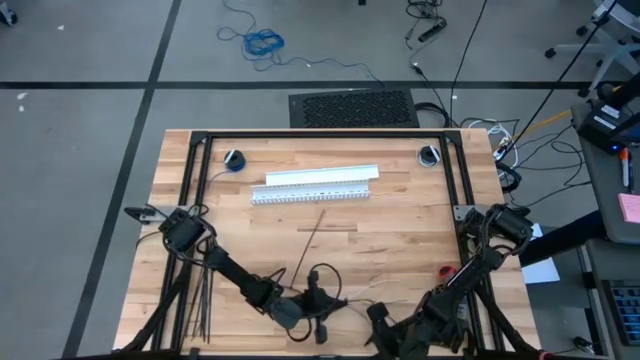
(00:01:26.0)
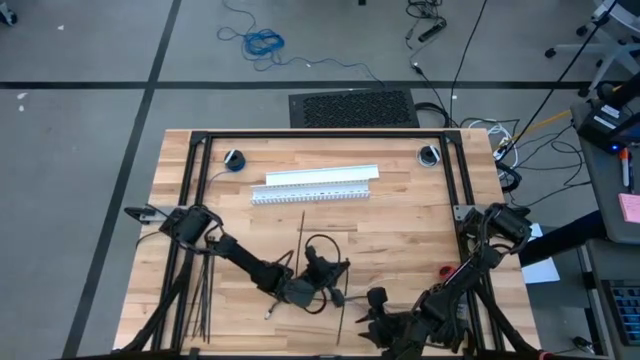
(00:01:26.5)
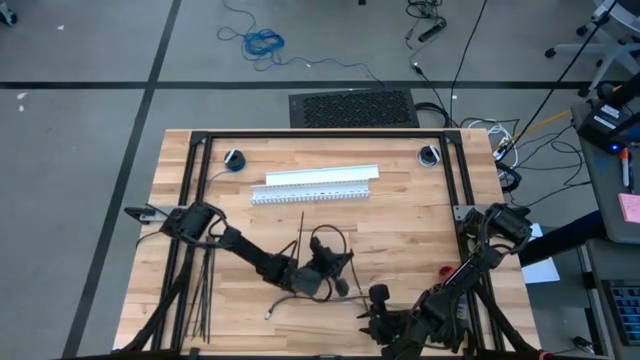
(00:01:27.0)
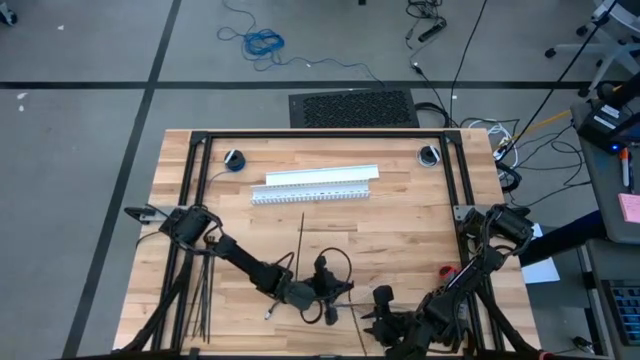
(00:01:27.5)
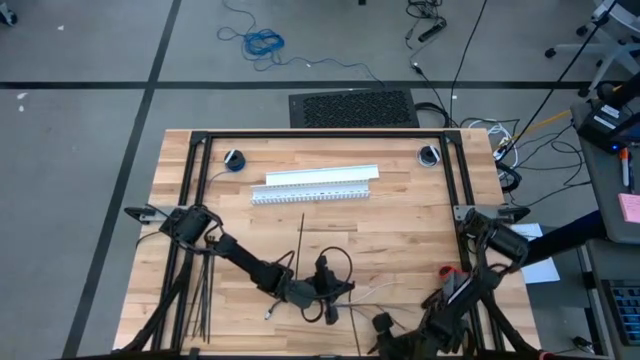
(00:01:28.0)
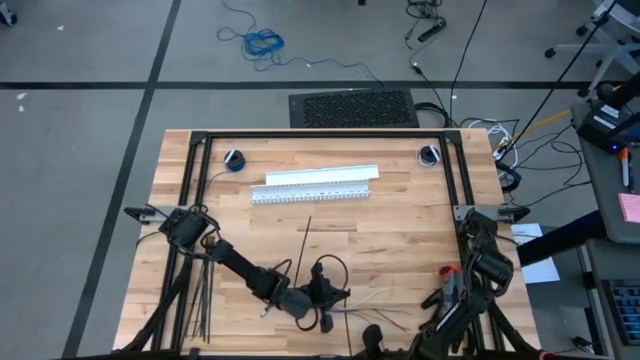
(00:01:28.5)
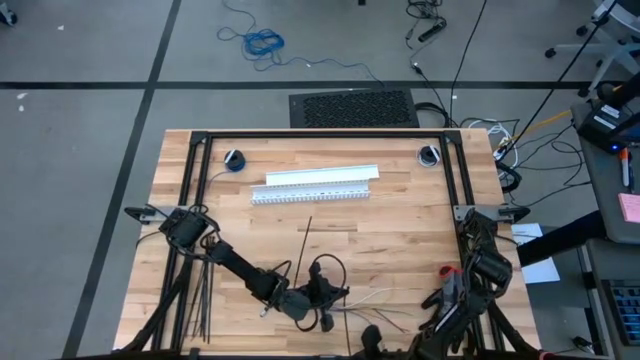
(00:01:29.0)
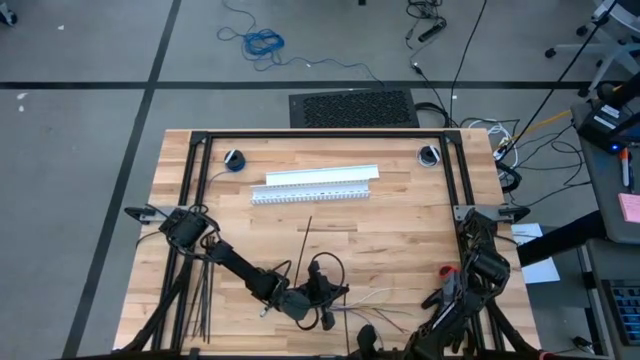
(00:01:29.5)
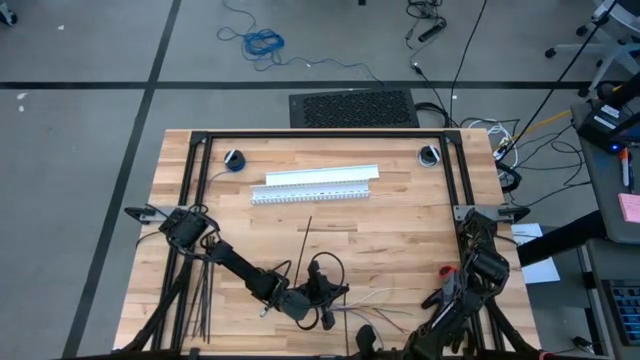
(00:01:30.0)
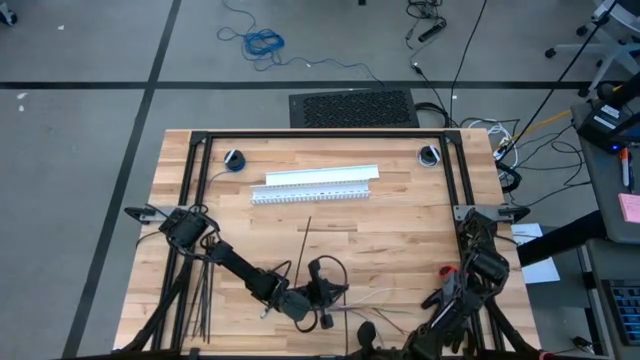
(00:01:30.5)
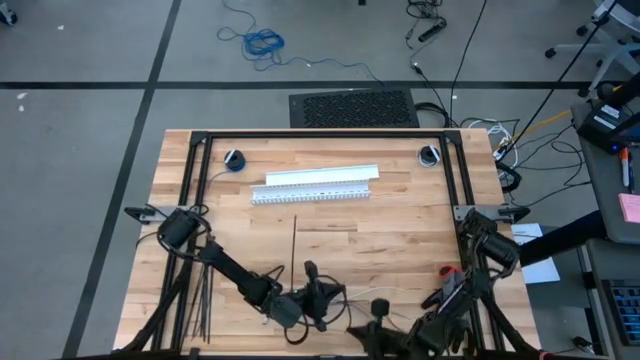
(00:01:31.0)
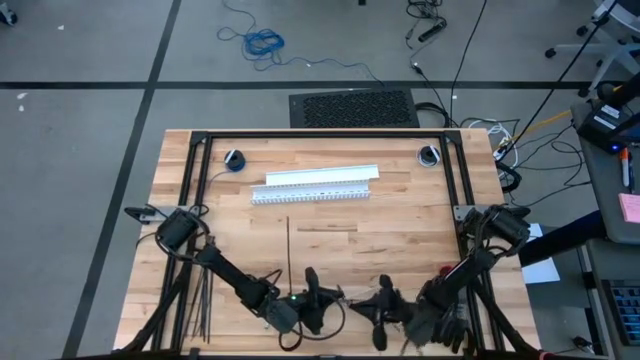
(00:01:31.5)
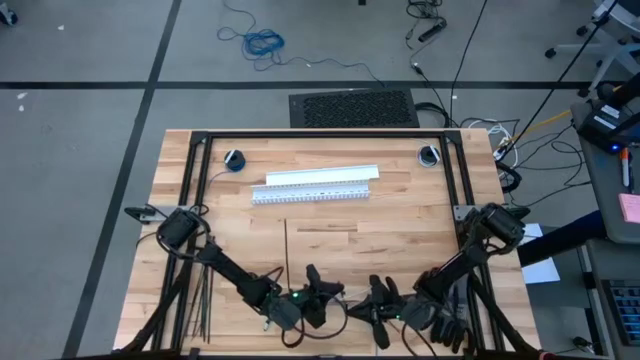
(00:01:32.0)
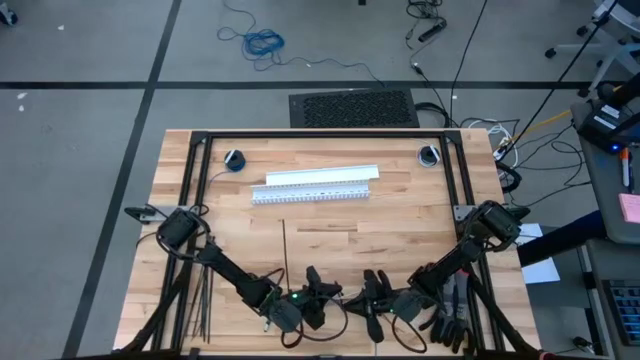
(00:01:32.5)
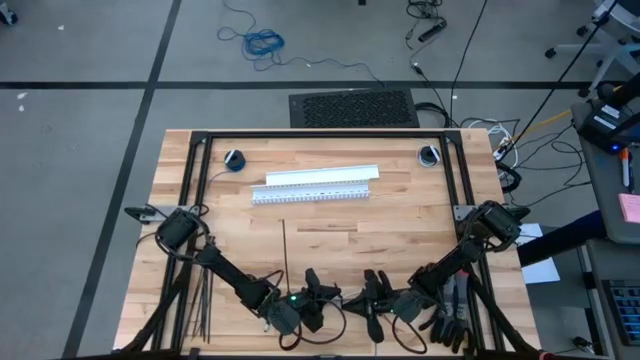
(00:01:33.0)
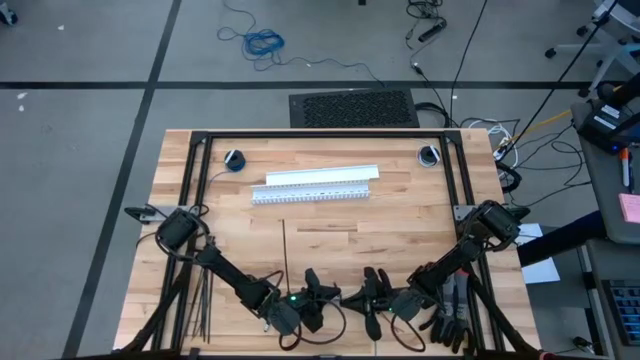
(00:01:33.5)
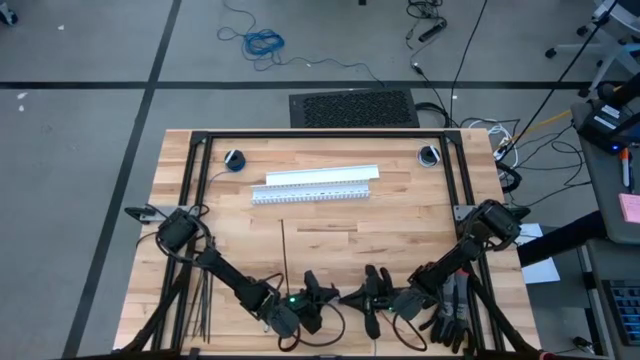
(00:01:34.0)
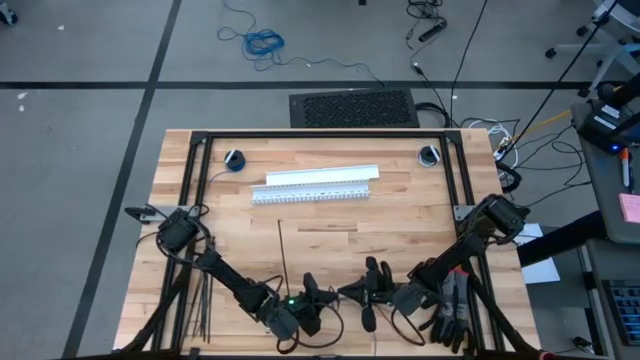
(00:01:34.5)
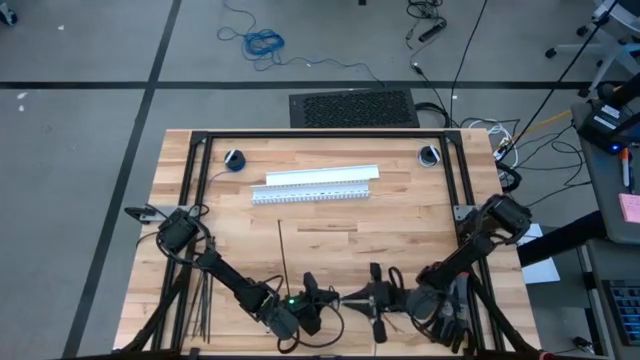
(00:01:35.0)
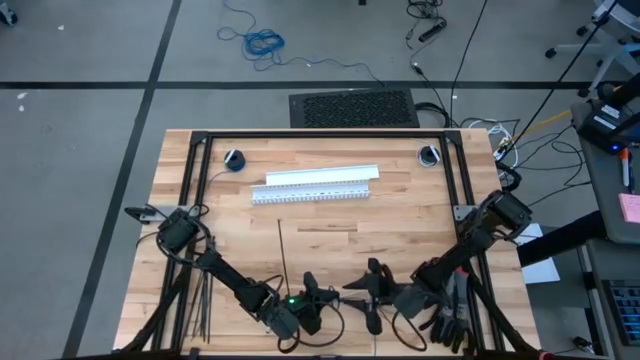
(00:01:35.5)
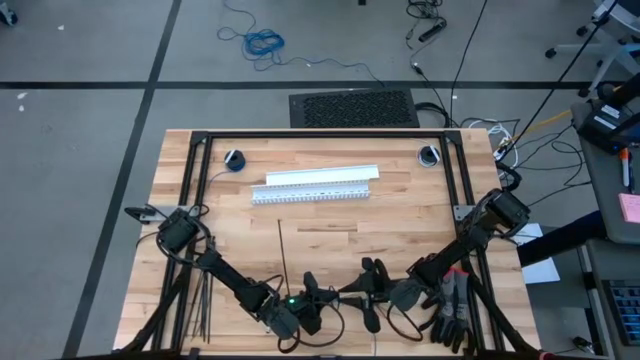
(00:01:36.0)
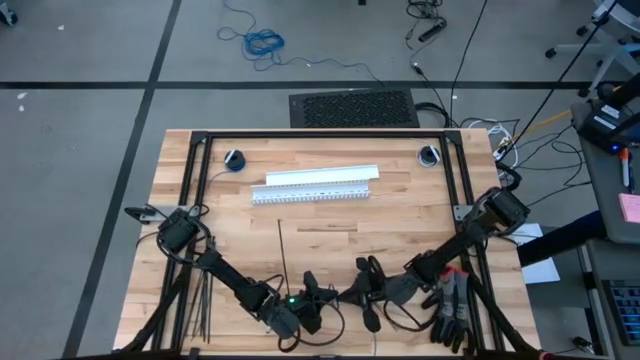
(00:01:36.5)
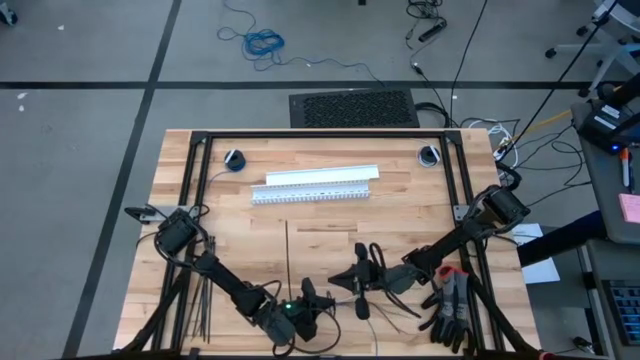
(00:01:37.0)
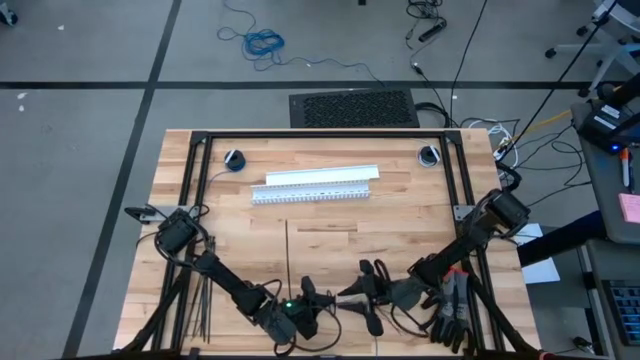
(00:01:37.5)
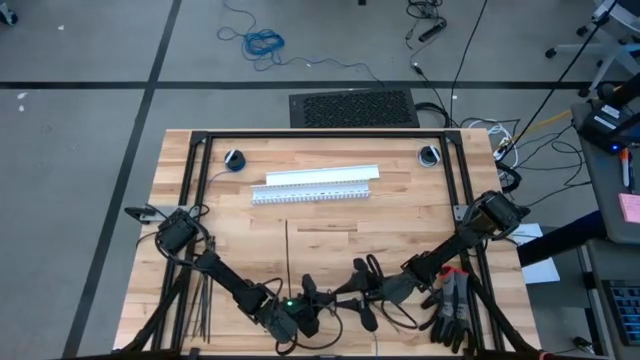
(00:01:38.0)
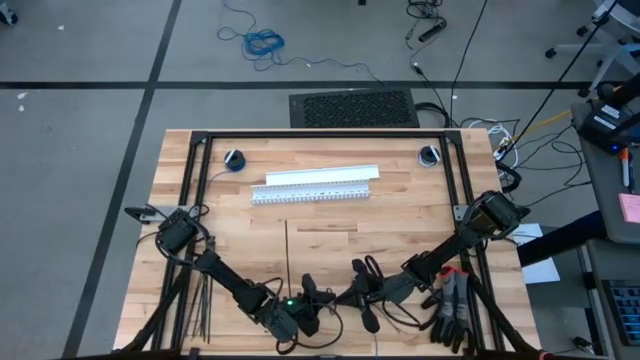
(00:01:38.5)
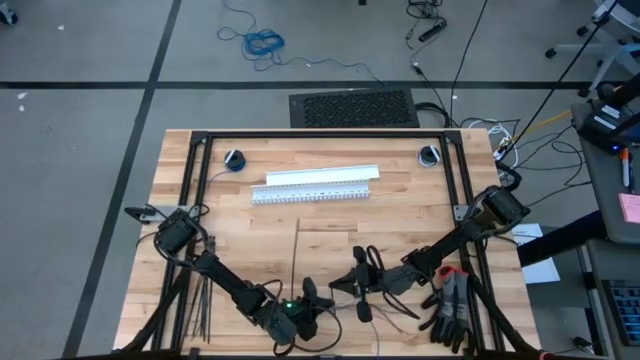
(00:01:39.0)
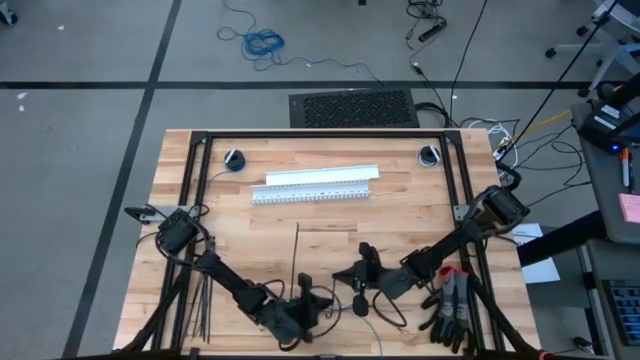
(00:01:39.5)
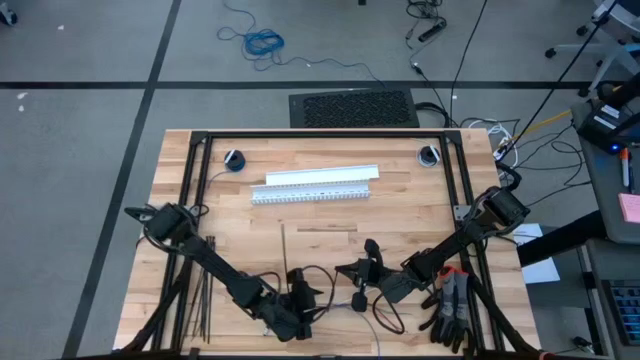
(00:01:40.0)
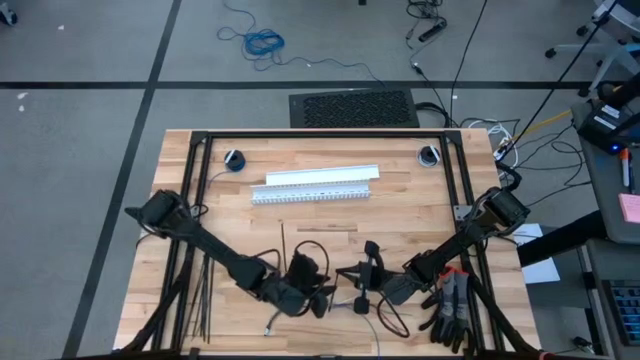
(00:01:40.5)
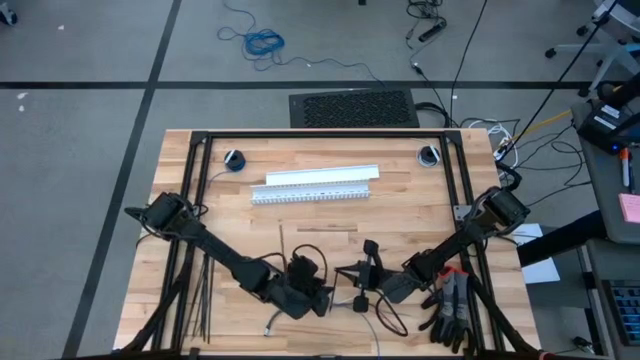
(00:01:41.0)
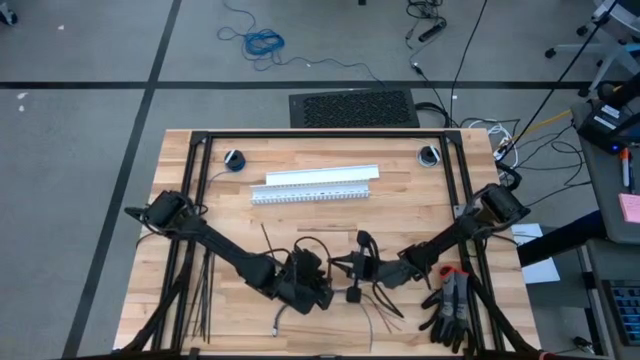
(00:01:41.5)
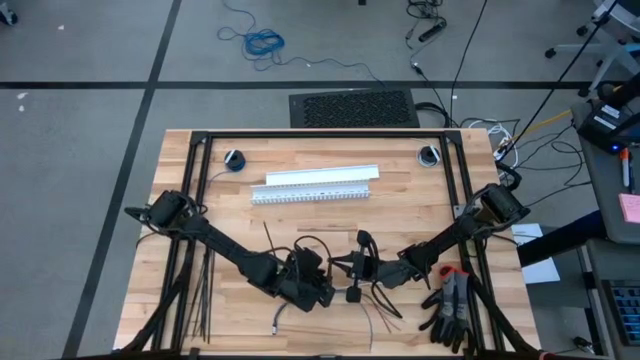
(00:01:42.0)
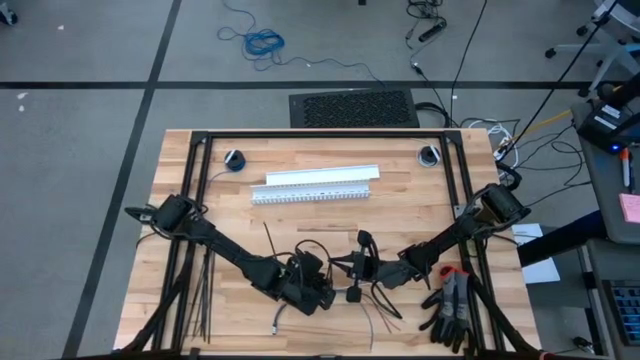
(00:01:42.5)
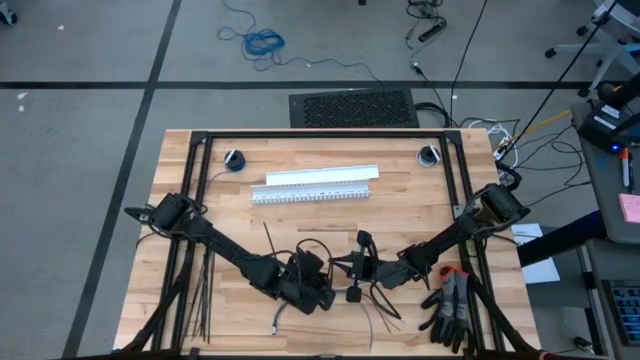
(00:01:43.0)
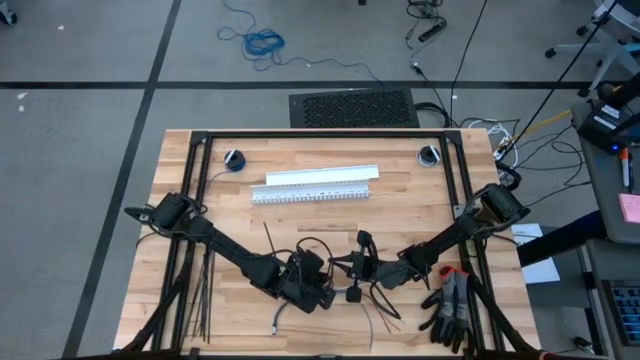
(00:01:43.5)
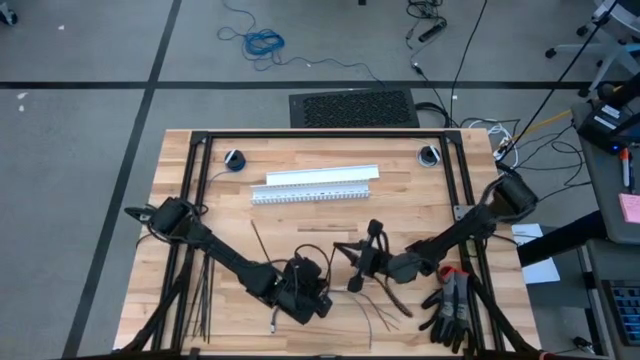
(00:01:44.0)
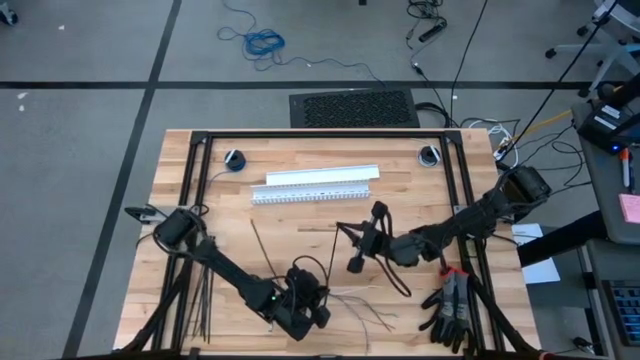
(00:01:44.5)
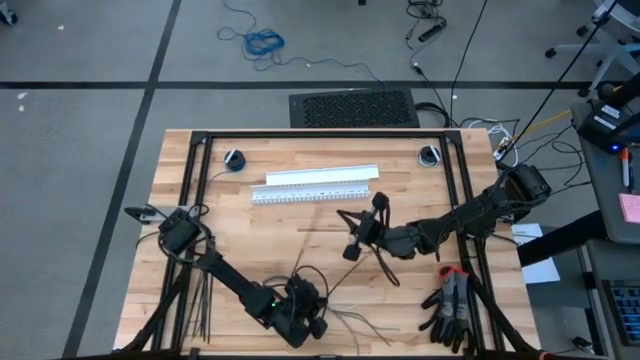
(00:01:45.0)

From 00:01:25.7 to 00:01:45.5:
Task: Ziptie cables
Wrap the black zip tie on the cables

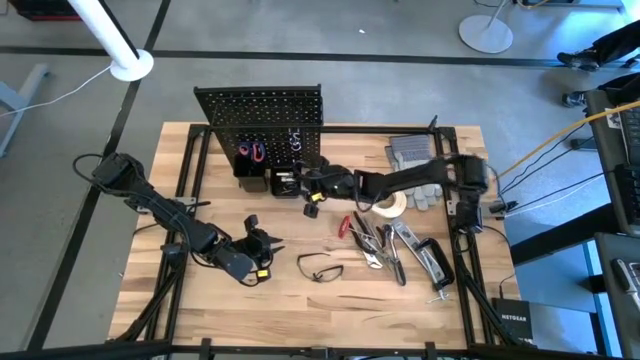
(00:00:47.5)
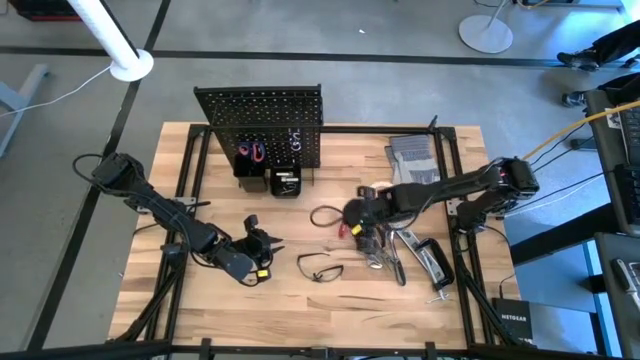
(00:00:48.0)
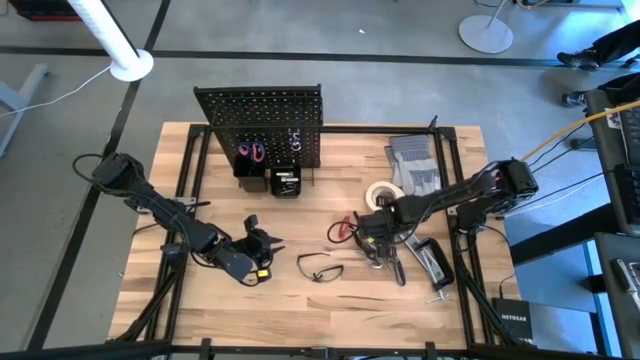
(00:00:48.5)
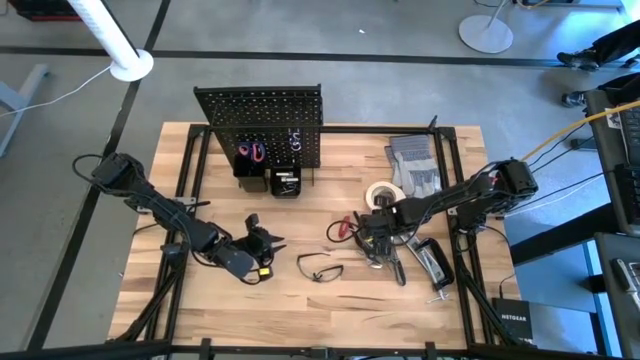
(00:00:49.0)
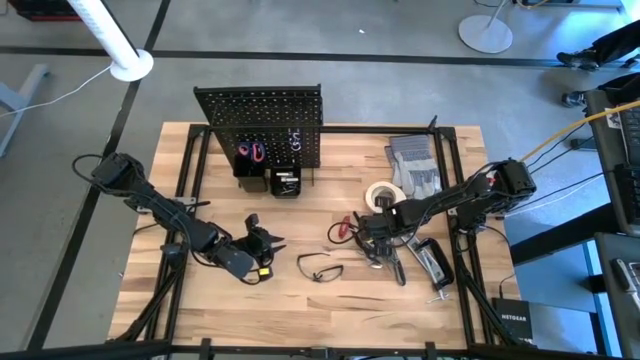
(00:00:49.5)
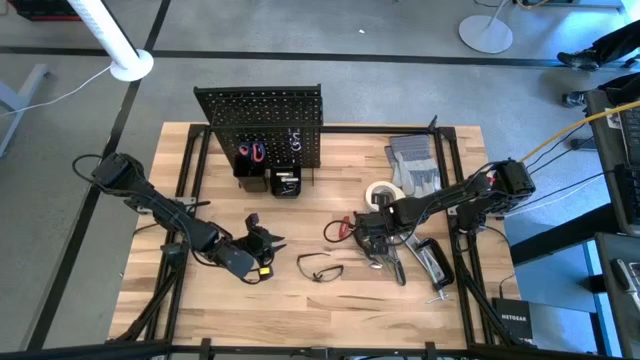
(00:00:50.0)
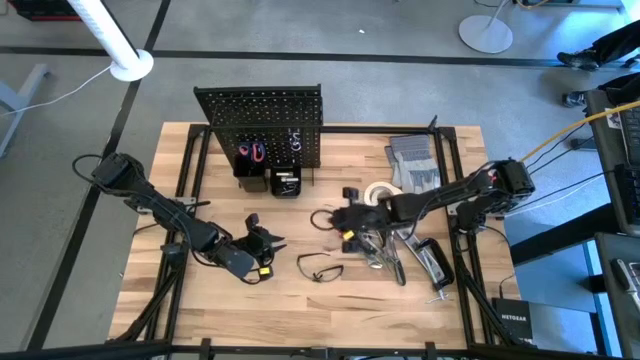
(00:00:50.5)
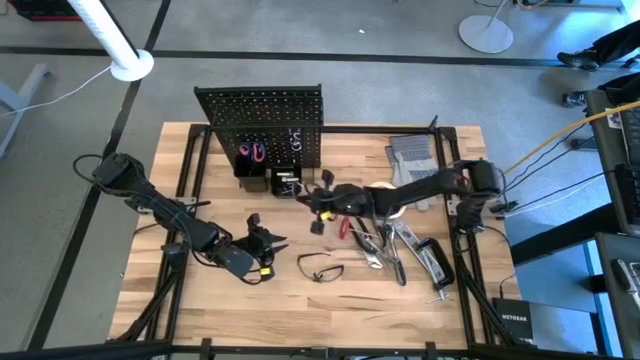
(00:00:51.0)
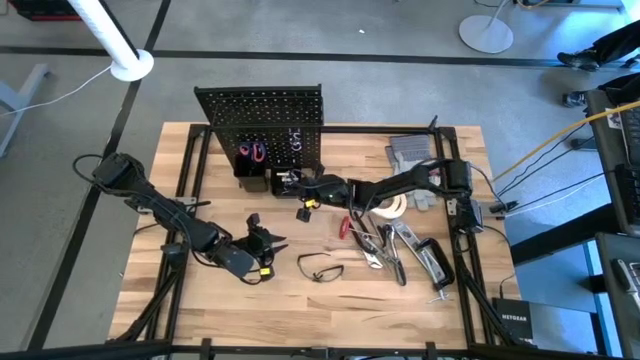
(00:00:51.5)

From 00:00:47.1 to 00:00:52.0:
Task: Hang tools onto peg board
Put the binder clip into the right pegboard organizer bin
